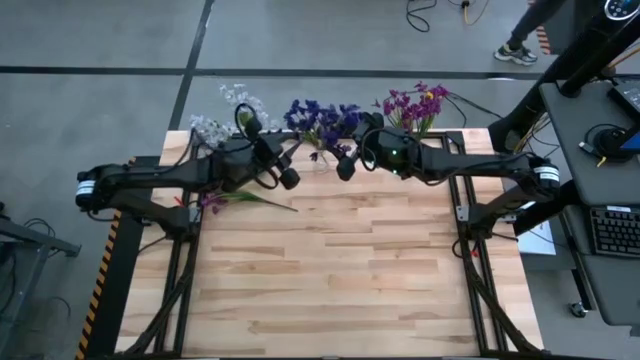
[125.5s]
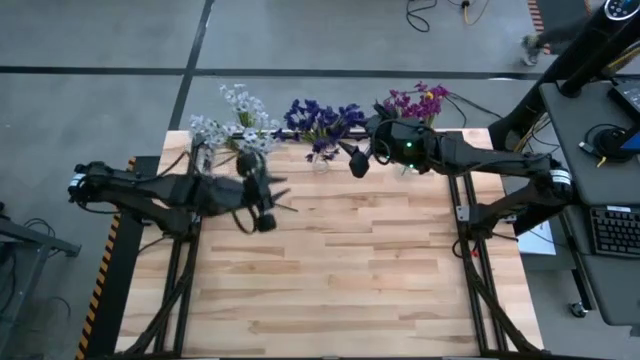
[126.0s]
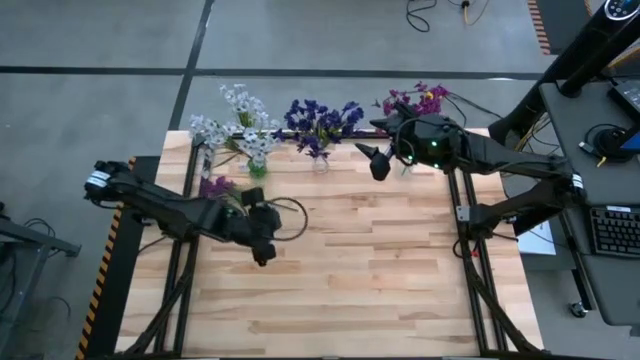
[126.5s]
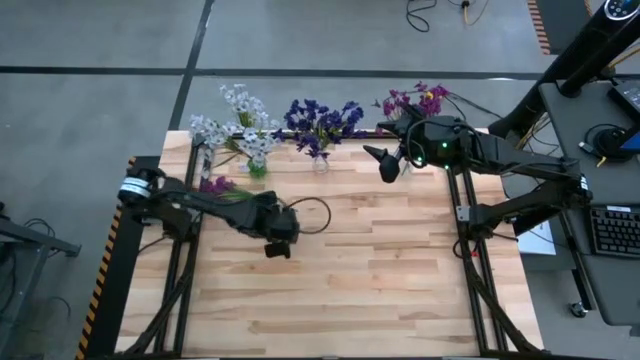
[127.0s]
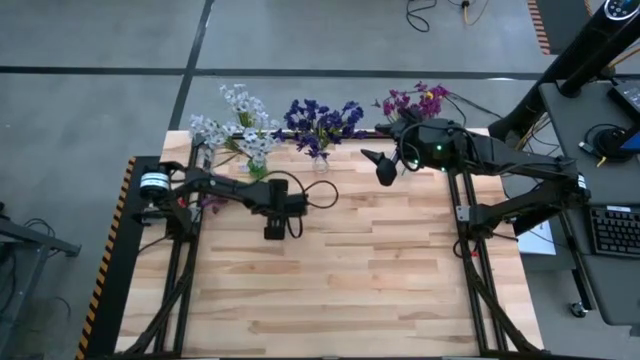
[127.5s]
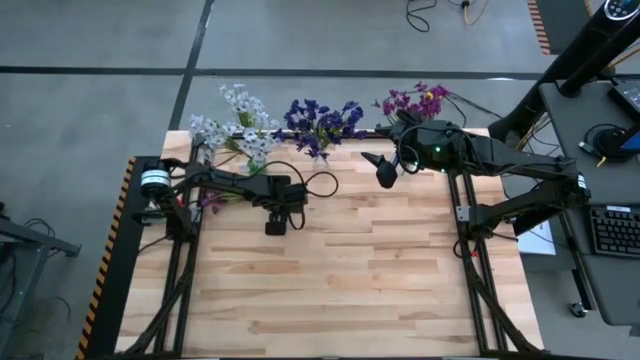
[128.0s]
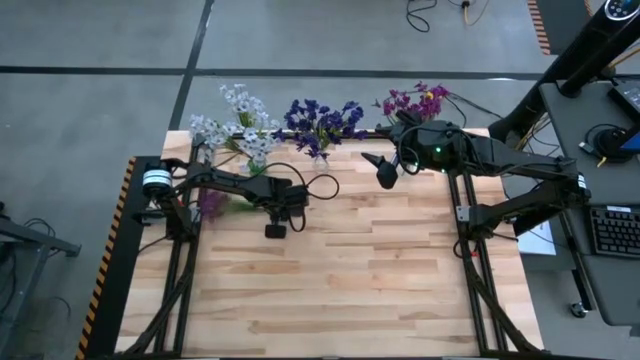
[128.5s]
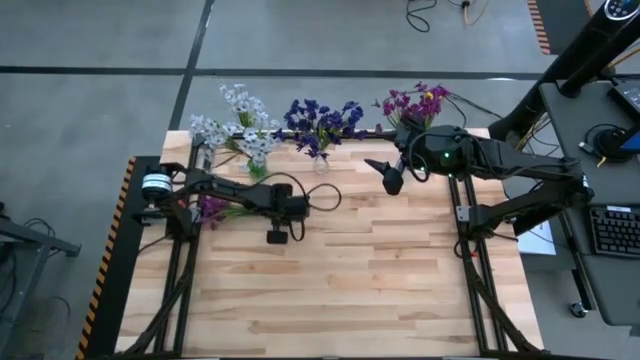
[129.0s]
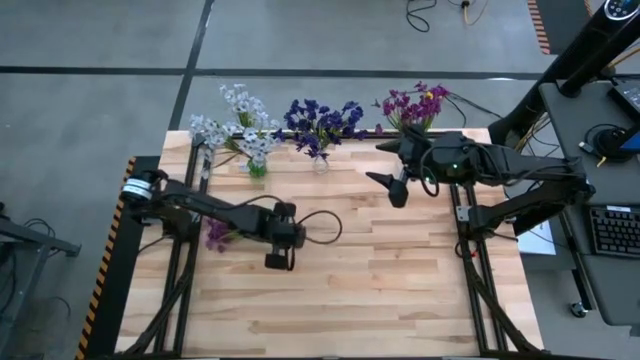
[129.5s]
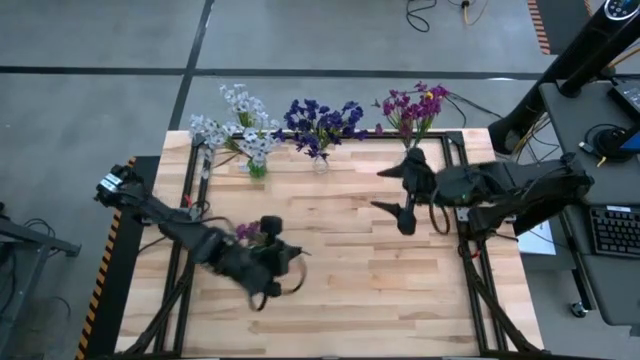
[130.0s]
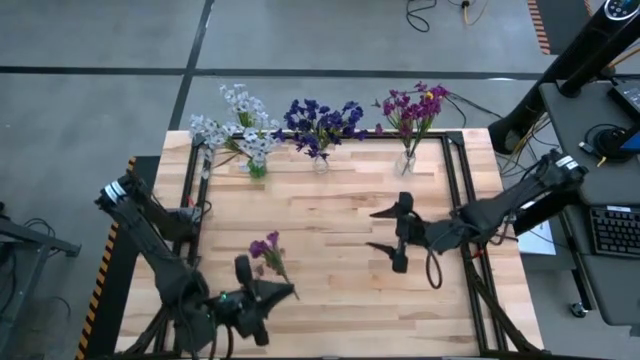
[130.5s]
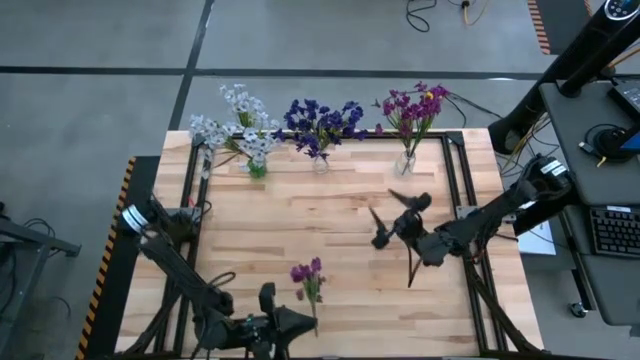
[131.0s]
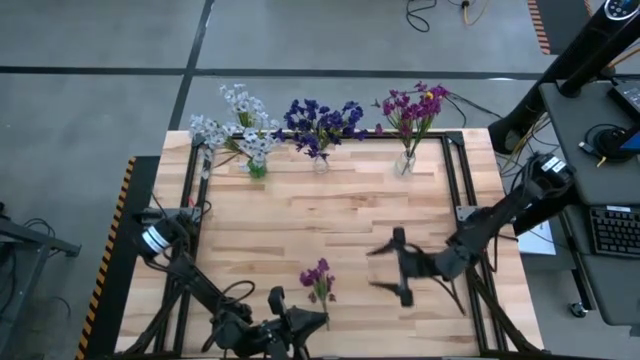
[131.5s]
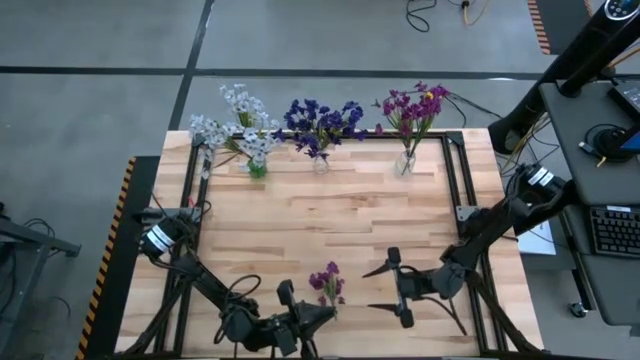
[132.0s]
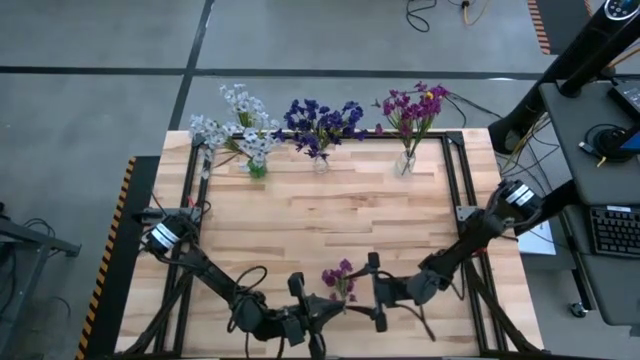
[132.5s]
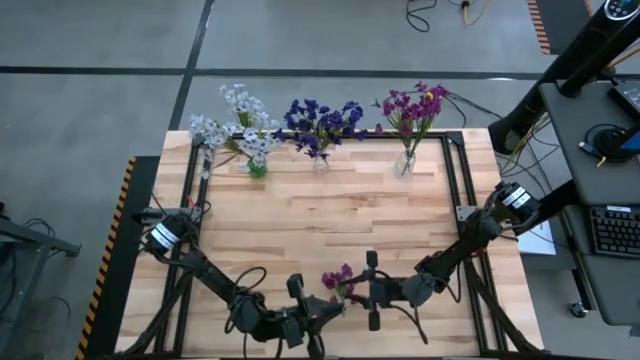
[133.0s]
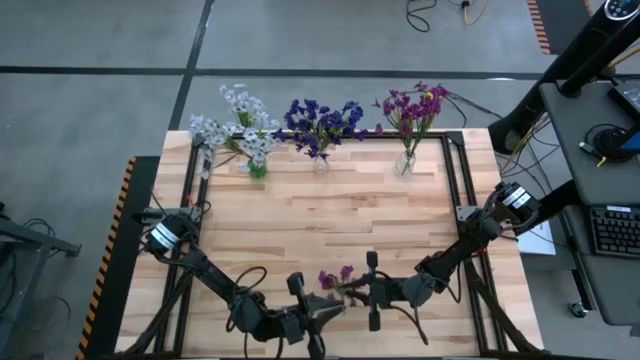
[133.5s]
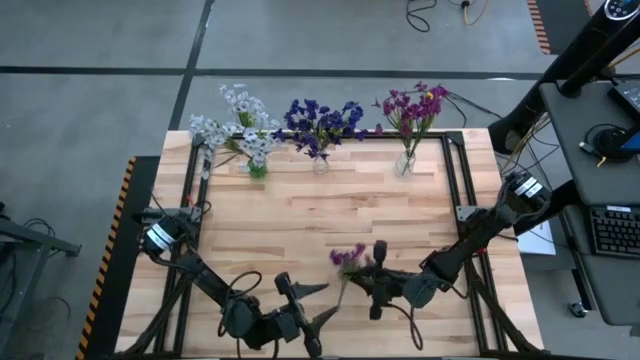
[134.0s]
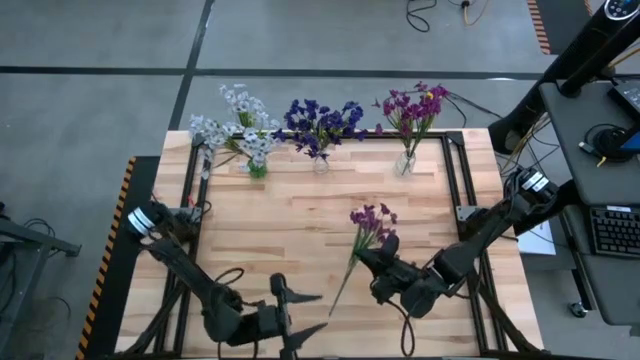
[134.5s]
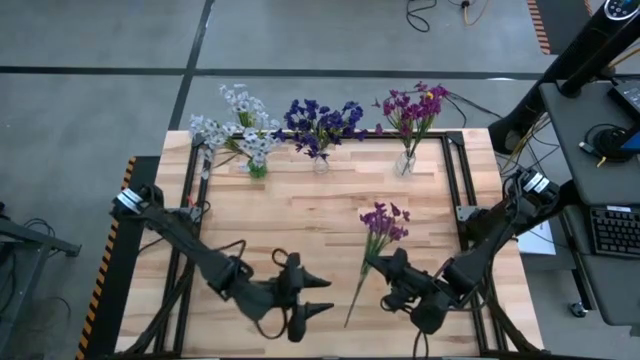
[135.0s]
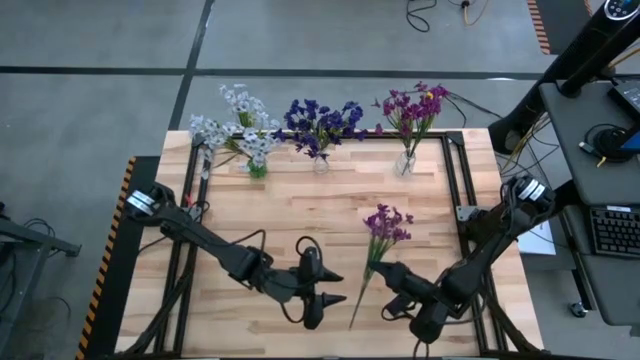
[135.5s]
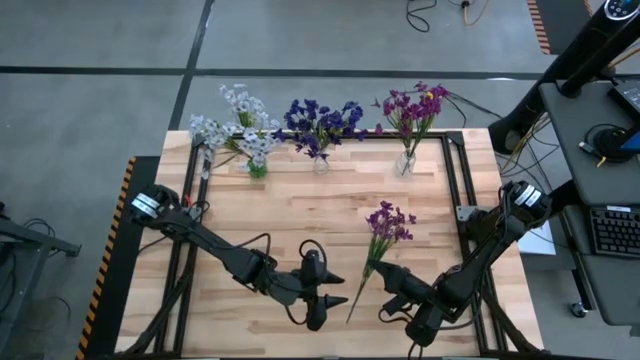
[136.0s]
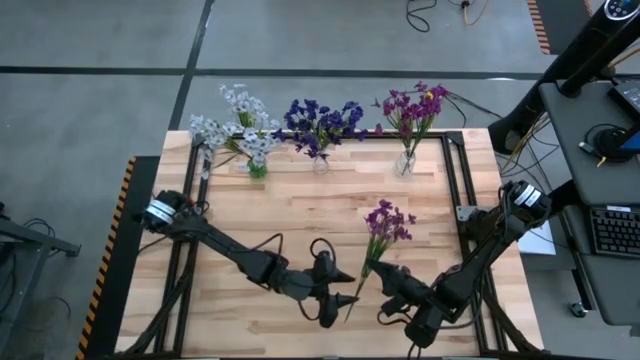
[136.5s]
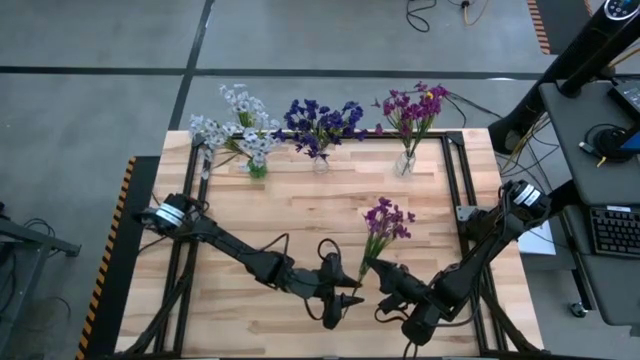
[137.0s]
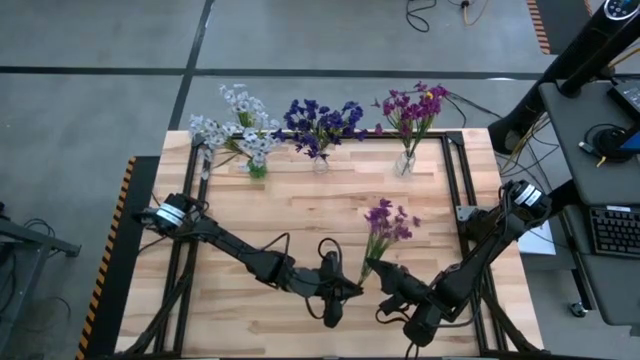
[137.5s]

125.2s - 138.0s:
Task: Sort flowers into vase by color
Put the light violet flowers into the right transparent vase

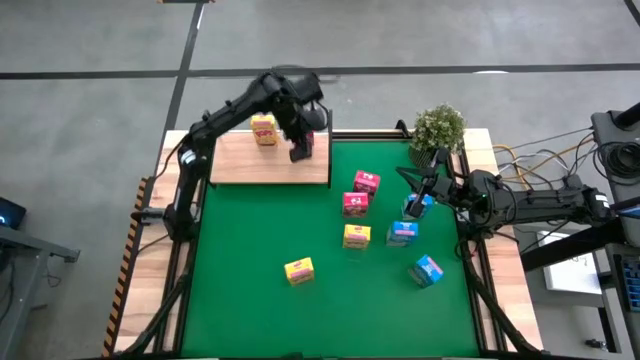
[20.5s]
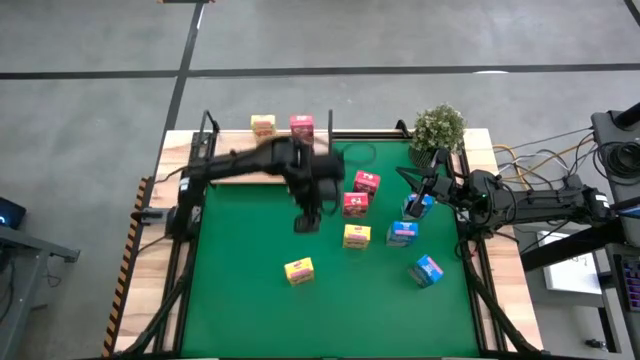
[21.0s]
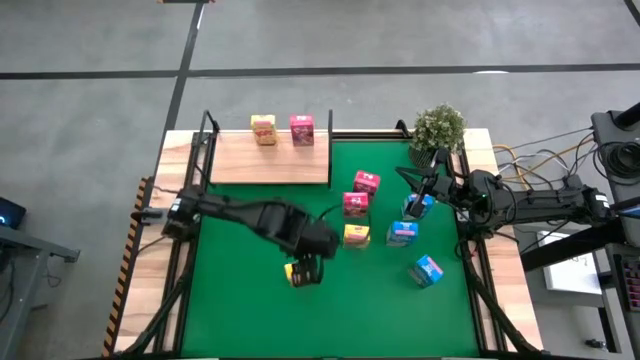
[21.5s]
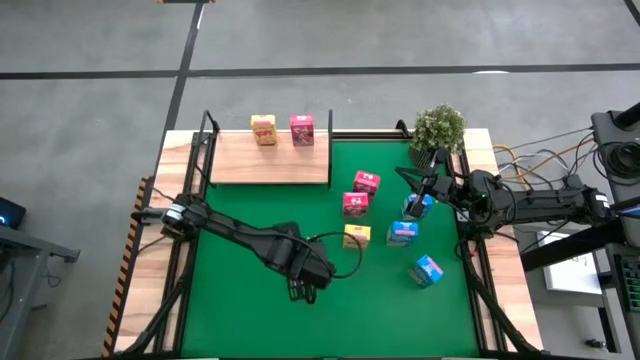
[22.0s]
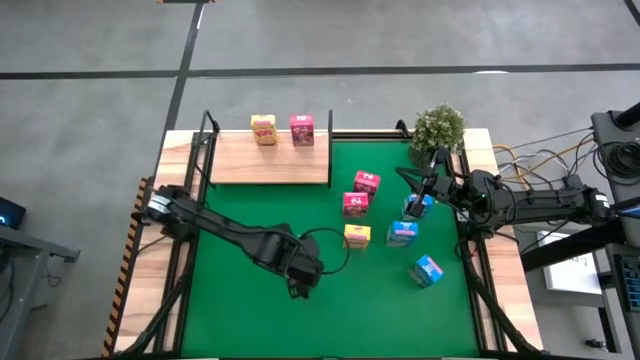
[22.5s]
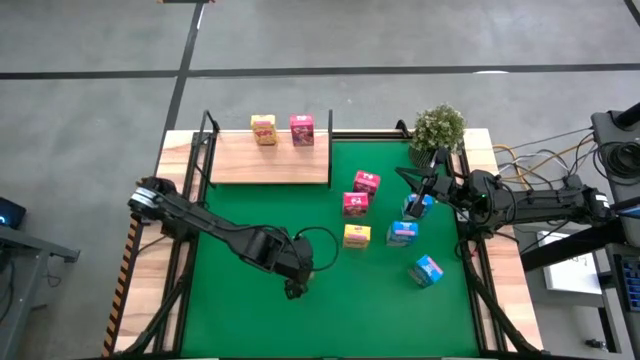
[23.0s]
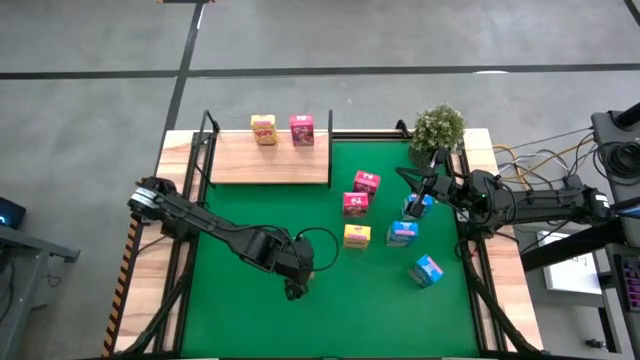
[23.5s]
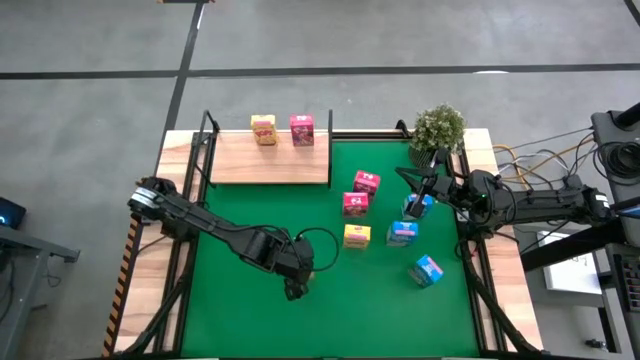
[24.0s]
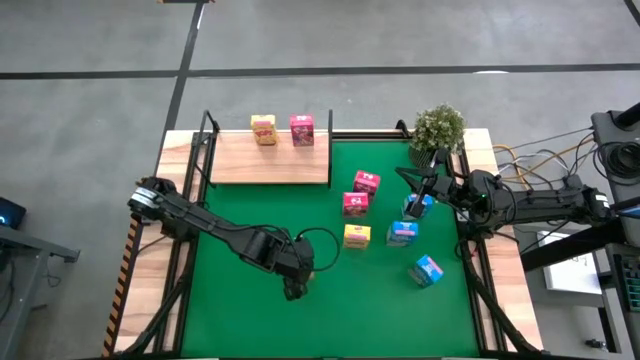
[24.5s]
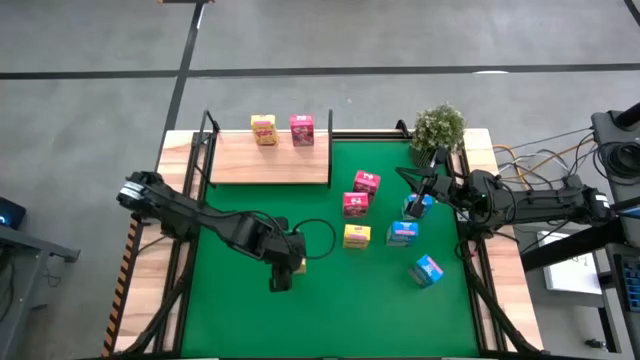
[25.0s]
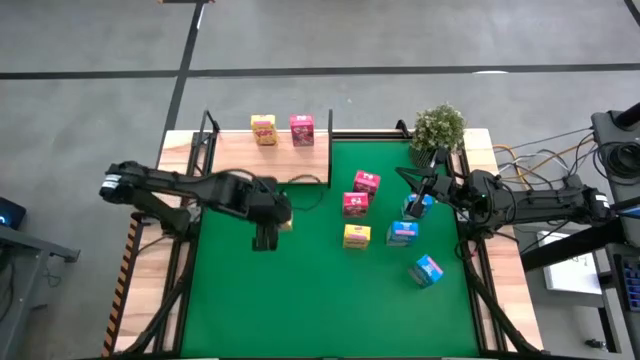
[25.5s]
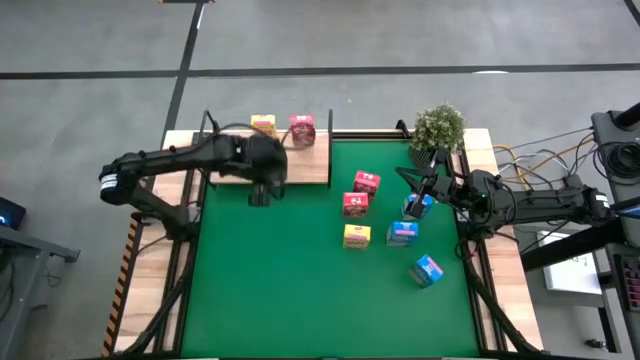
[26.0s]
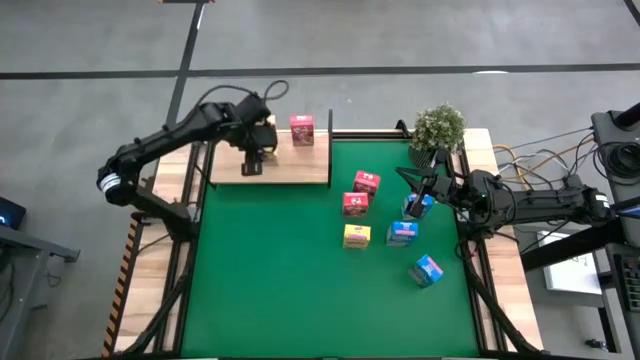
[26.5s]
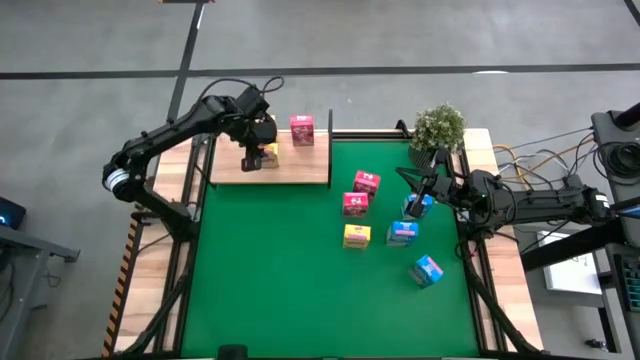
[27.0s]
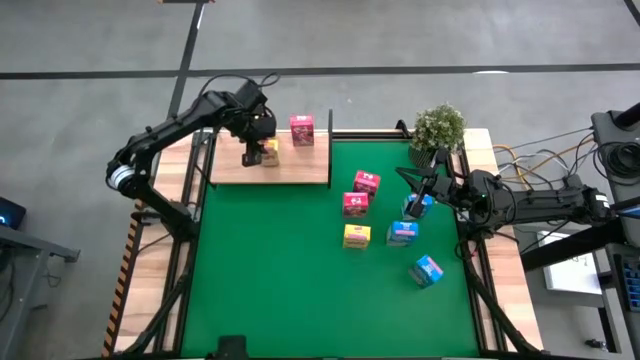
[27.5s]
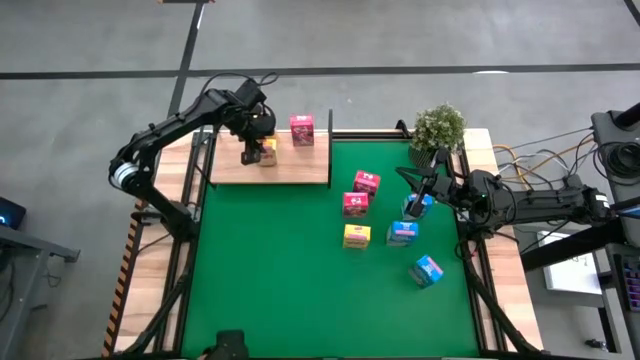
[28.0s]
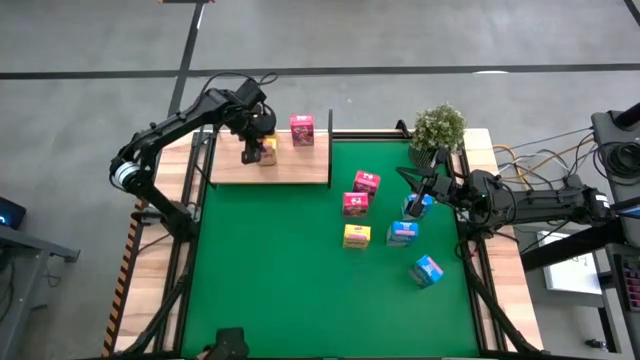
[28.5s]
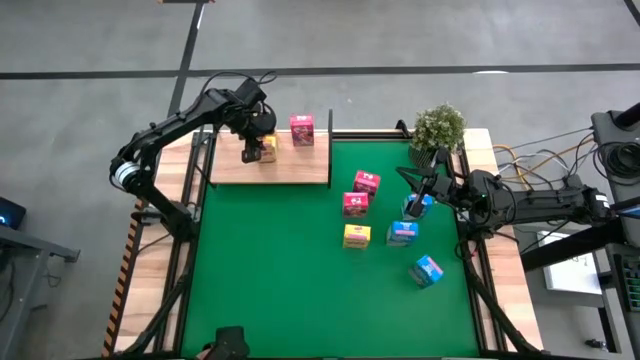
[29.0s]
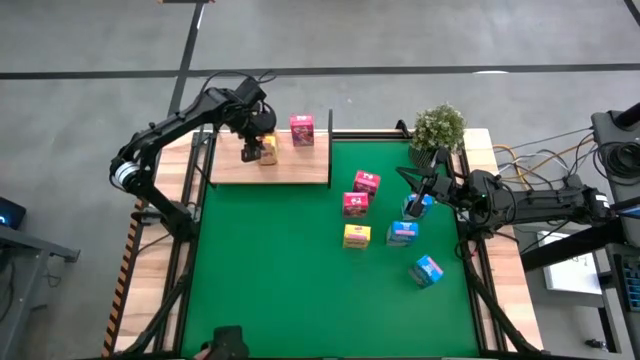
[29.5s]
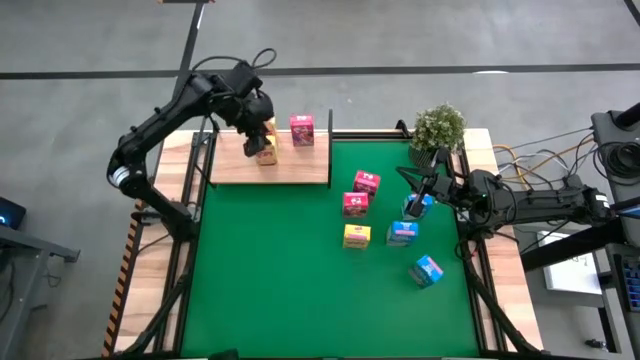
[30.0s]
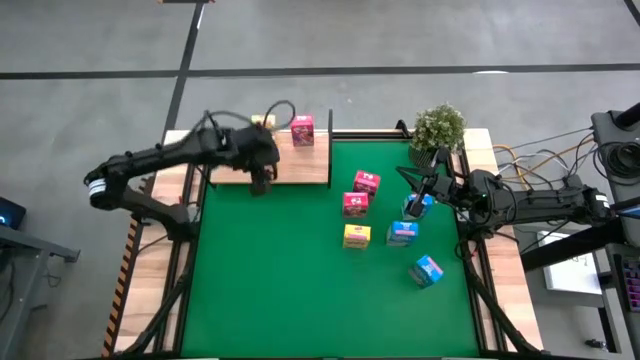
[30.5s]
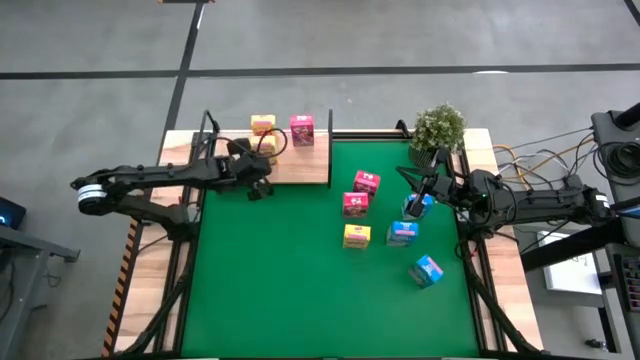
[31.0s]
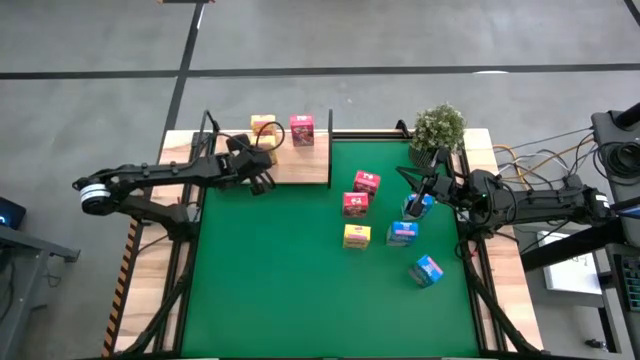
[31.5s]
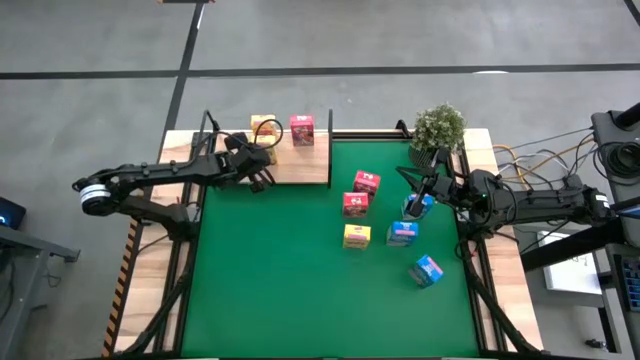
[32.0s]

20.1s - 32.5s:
Task: Stack cereal on shelf
Put the bottom yellow cereal box aligned with the yellow cereal box on the shelf
